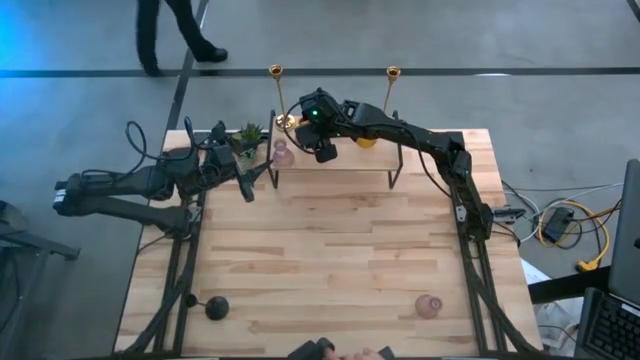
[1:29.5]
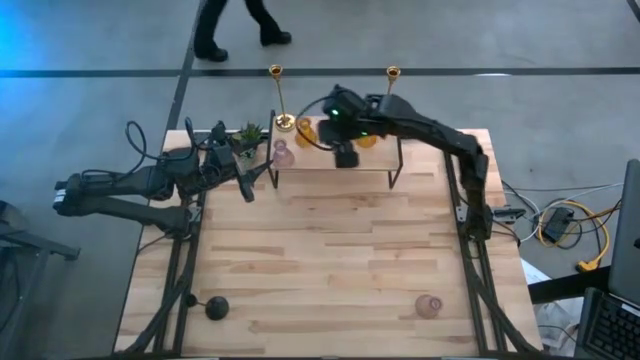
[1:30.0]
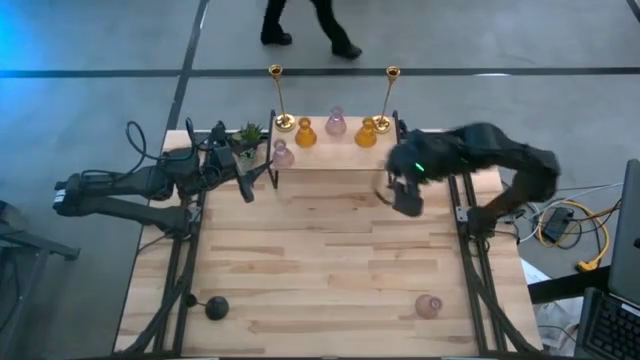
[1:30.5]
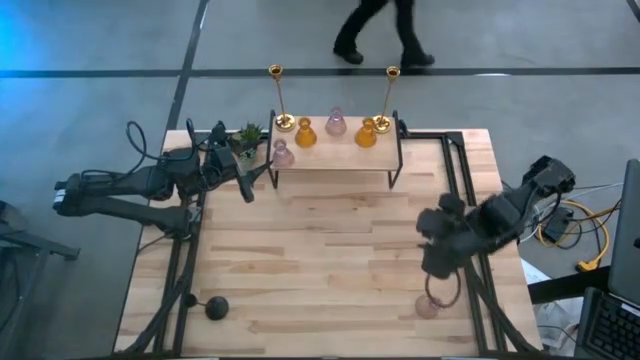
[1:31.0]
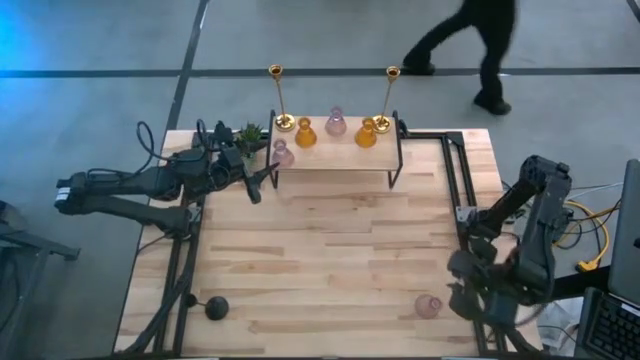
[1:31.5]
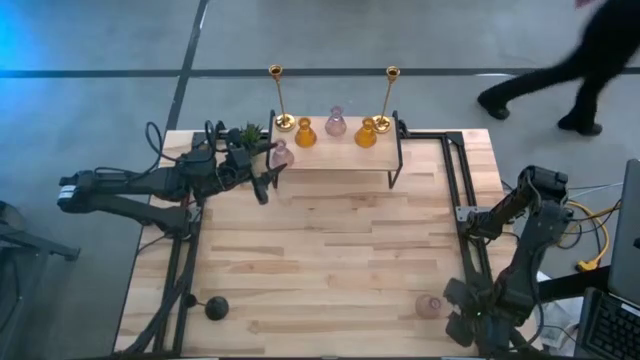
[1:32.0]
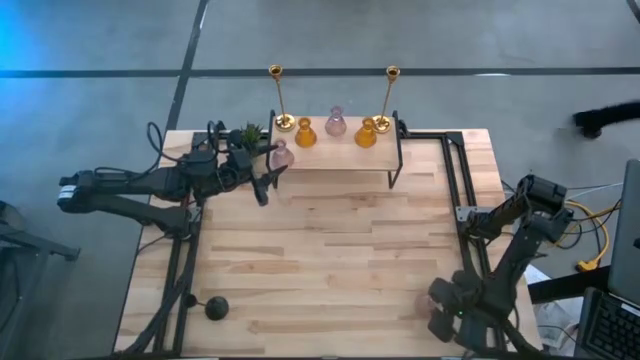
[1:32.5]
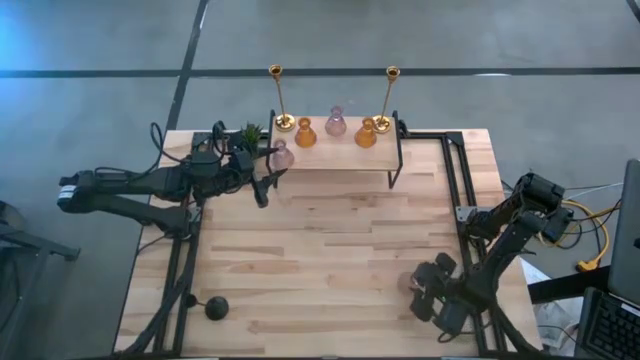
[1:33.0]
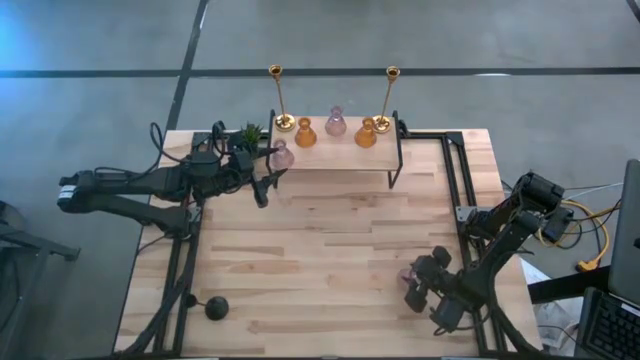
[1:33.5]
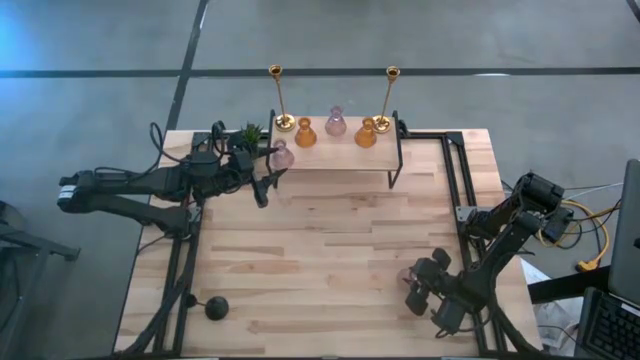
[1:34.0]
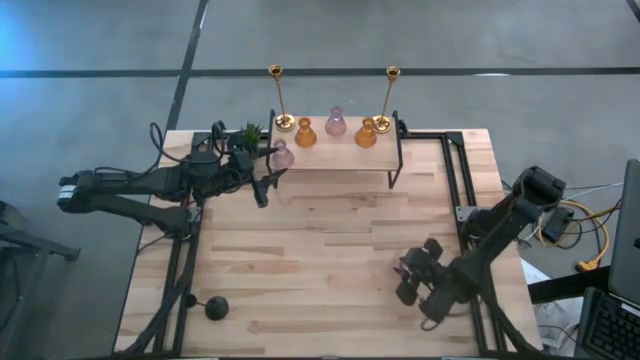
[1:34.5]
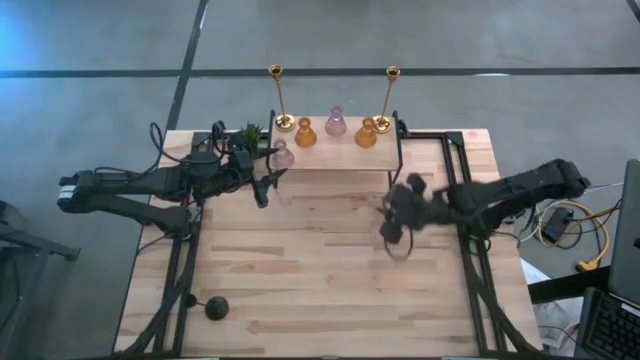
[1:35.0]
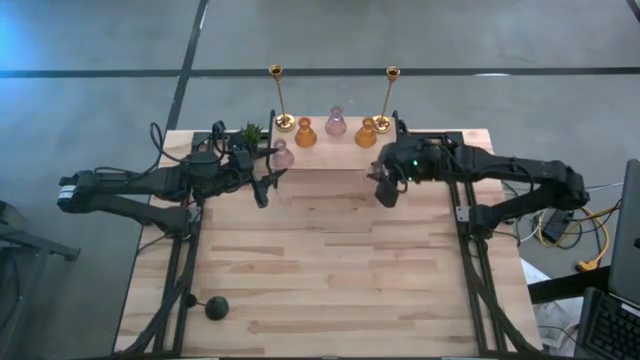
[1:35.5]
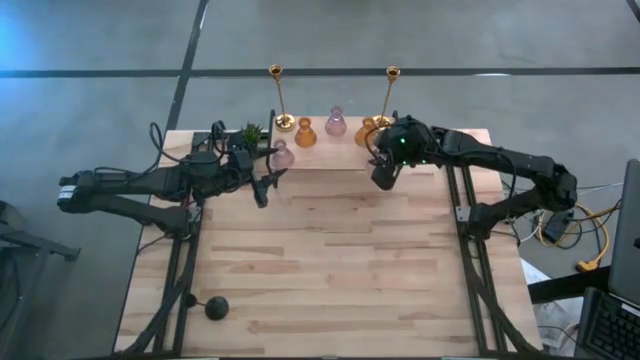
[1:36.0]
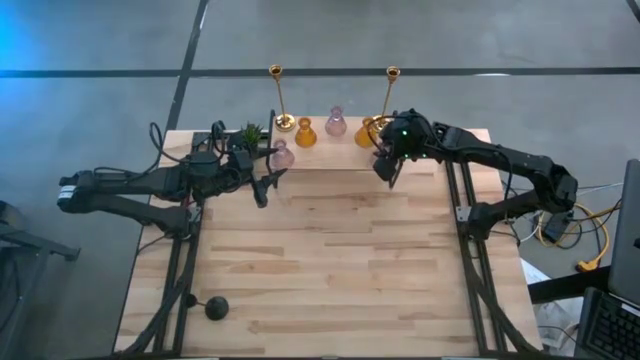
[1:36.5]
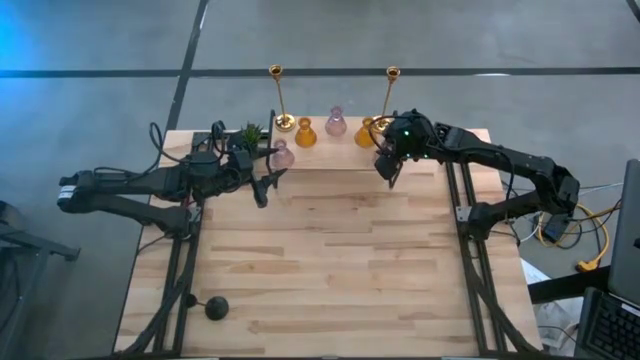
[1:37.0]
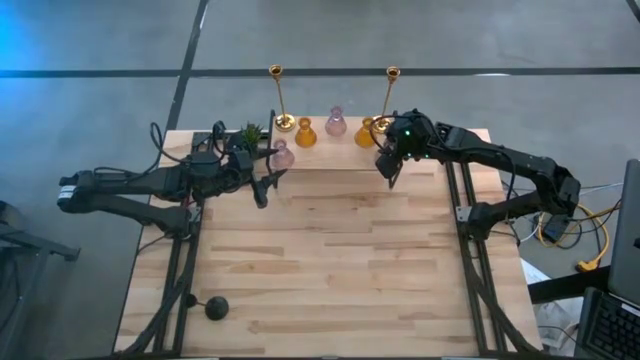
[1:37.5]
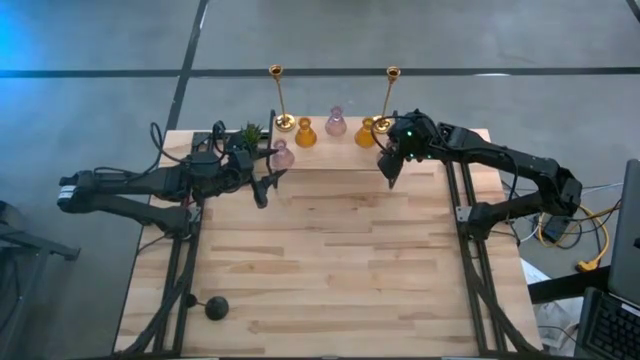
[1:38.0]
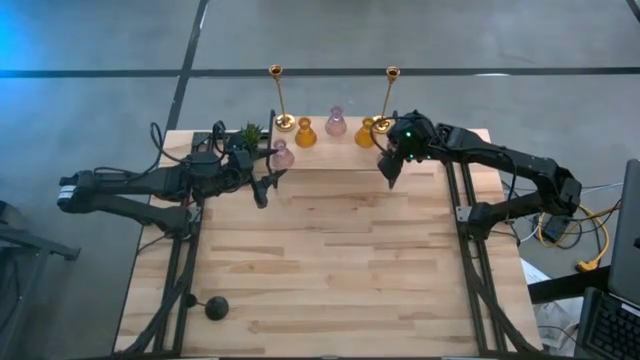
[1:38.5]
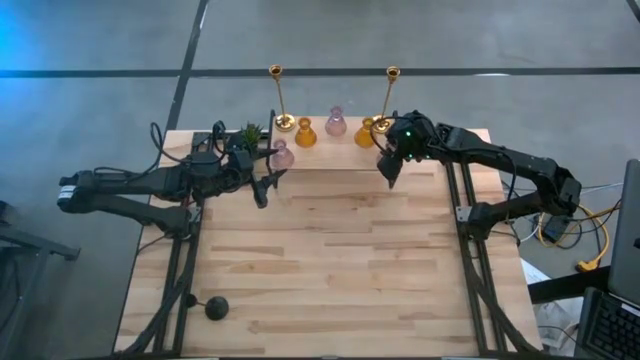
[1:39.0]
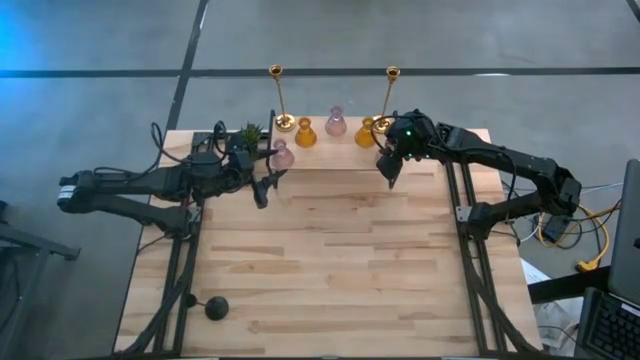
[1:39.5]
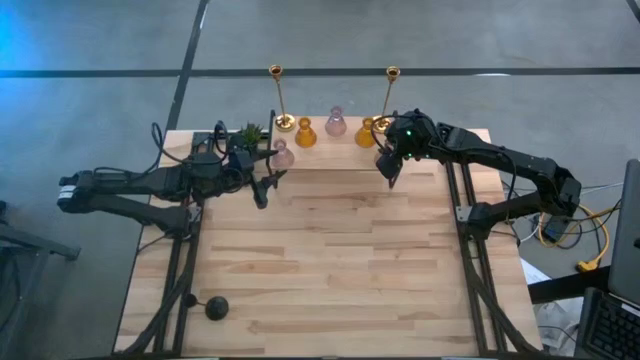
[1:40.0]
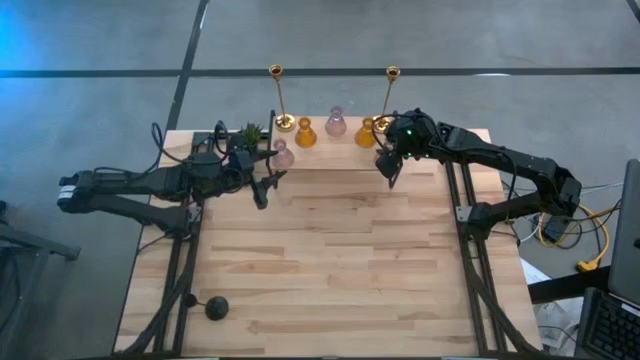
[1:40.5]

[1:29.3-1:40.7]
Task: Pick & Place candle stick holders
Put the pink glass candle holder on the shelf

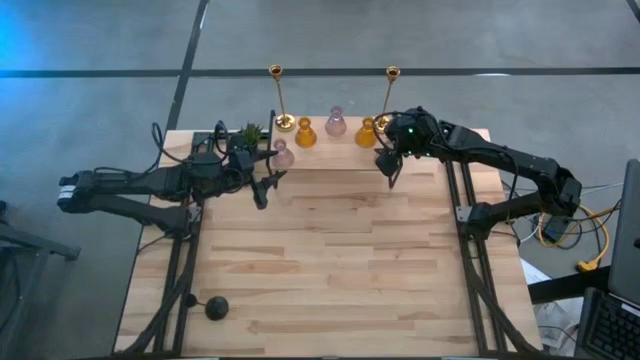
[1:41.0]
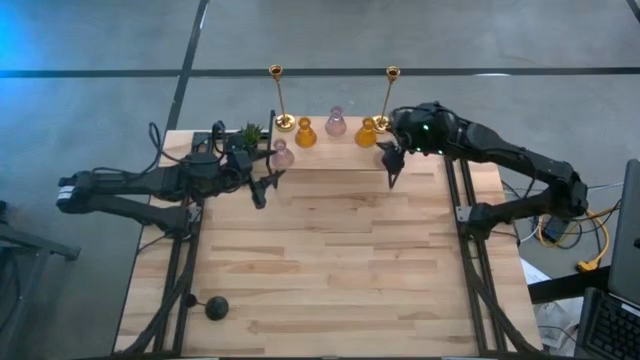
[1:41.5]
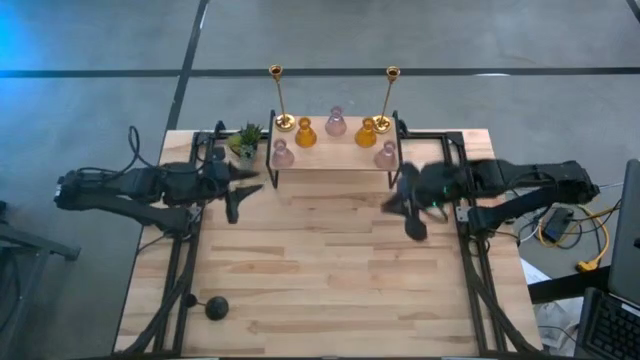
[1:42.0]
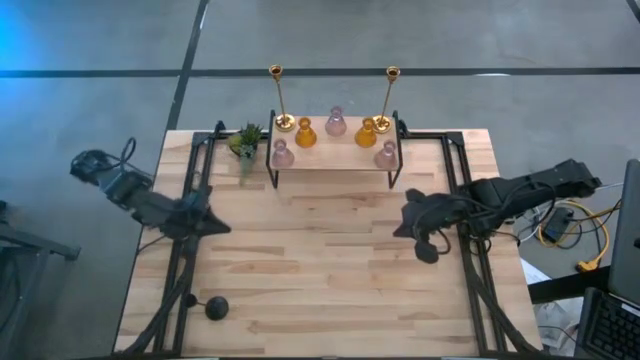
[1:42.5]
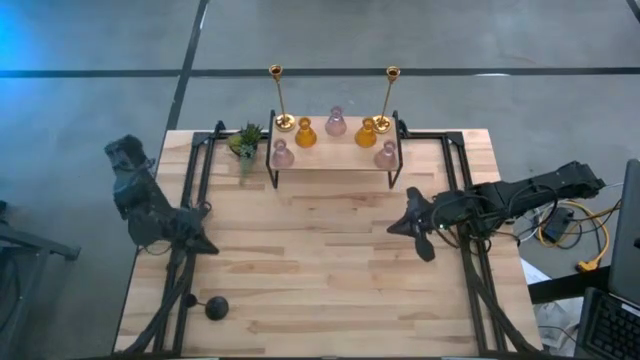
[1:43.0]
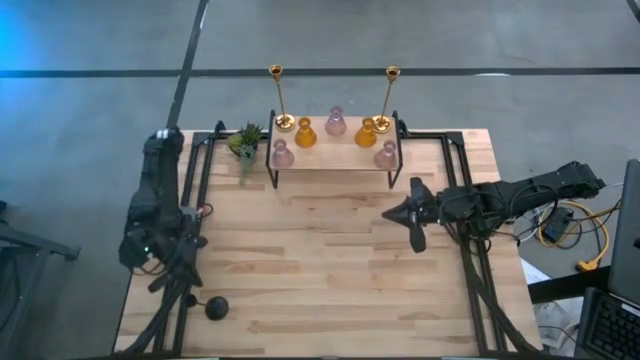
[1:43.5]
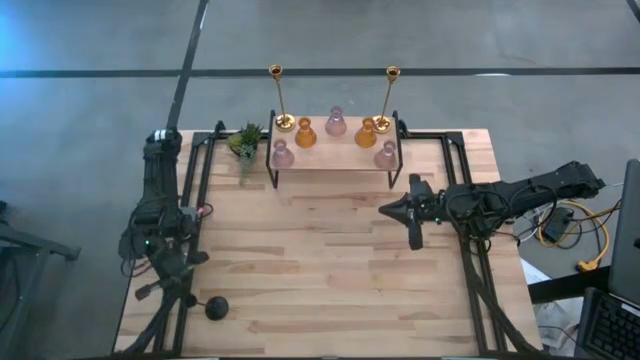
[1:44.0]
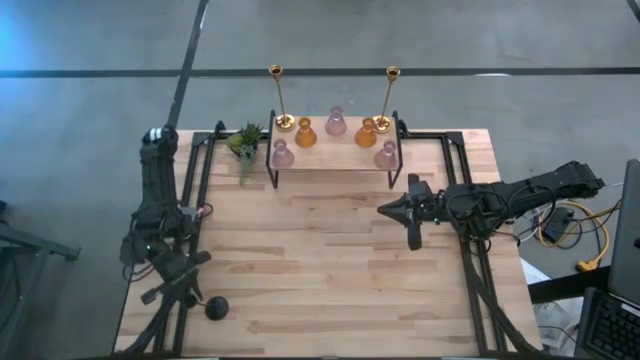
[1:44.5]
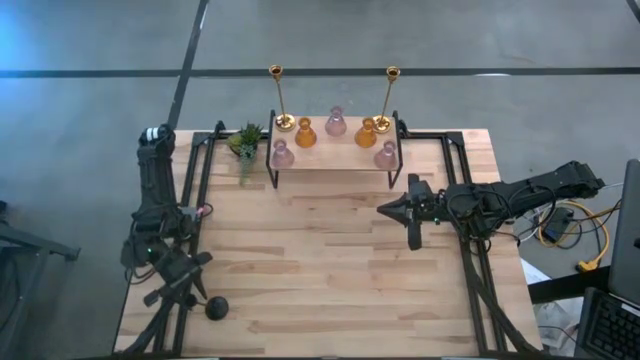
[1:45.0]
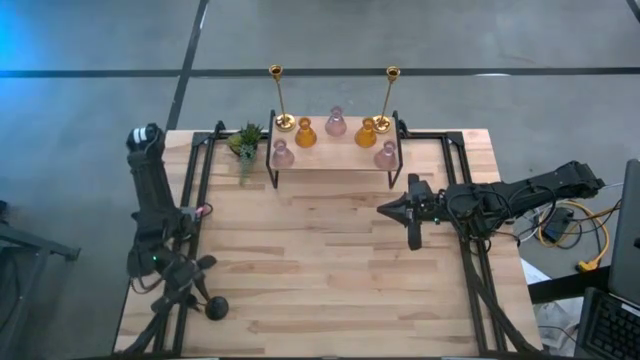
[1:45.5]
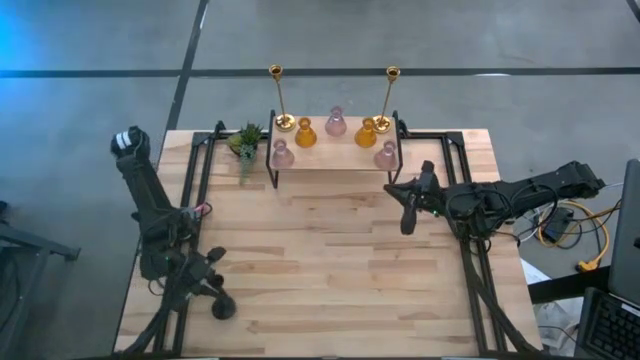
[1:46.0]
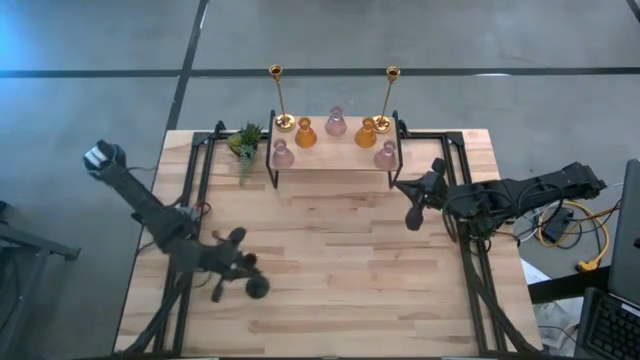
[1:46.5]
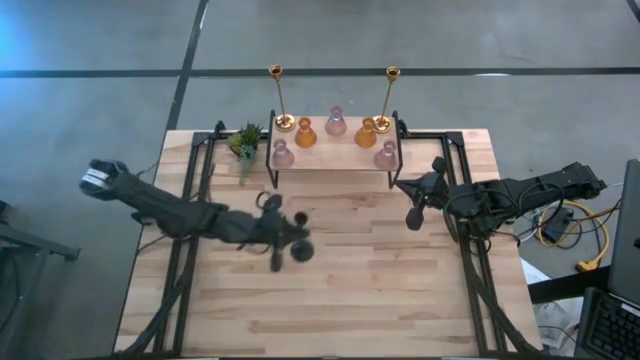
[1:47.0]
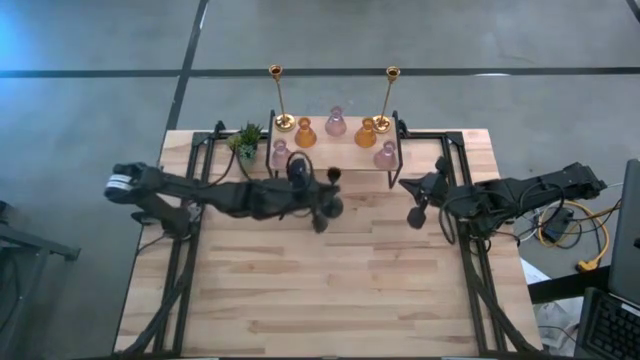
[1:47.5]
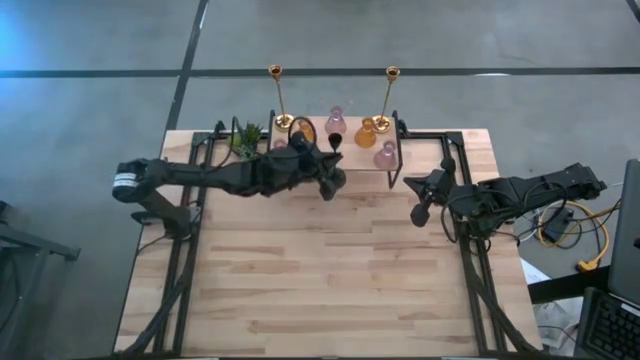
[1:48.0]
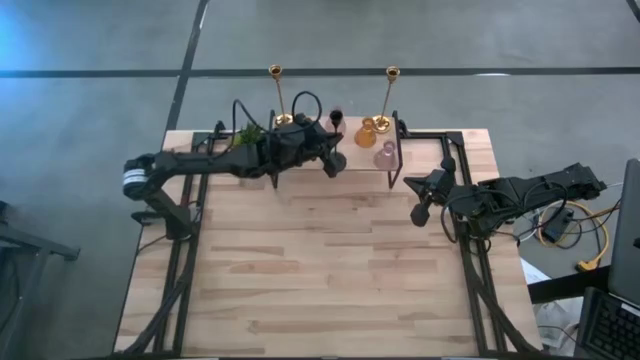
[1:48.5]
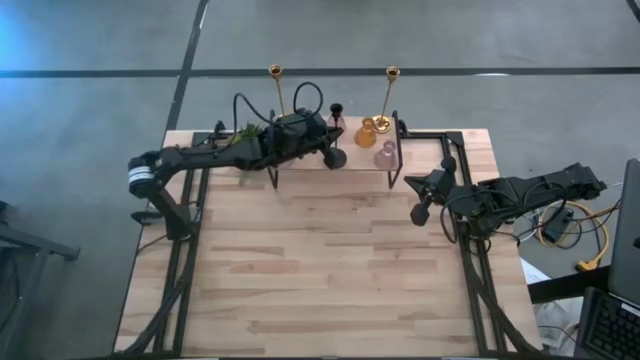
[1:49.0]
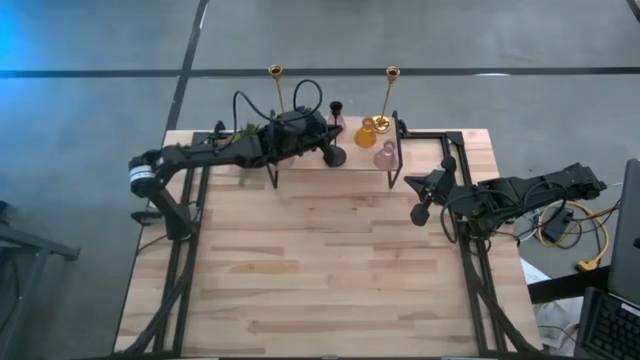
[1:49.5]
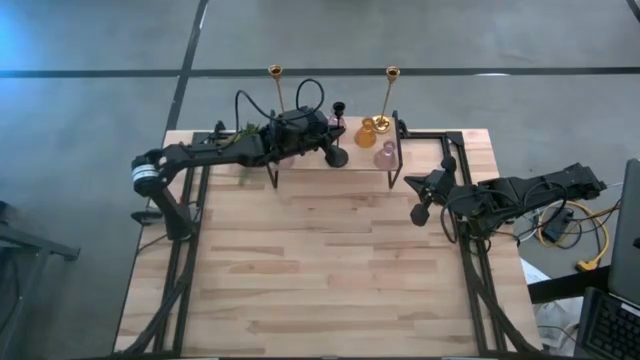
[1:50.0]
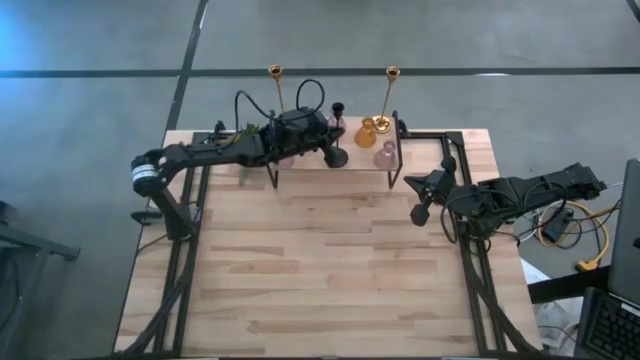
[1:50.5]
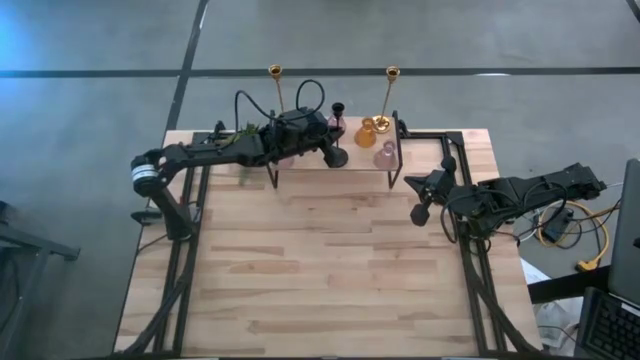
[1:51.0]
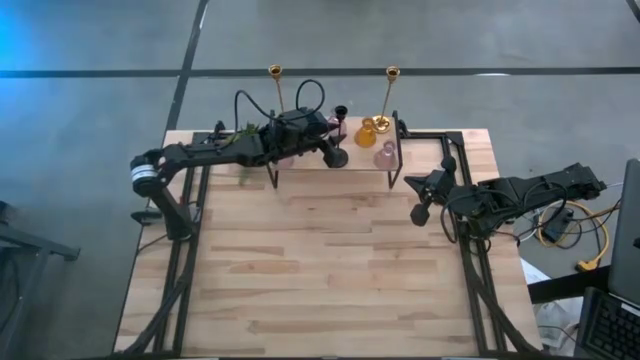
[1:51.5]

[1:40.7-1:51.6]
Put the black candle holder on the shelf
